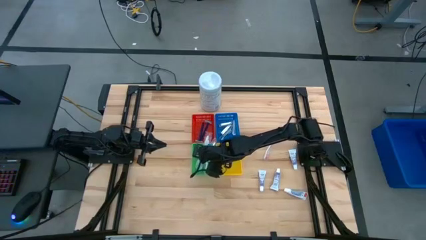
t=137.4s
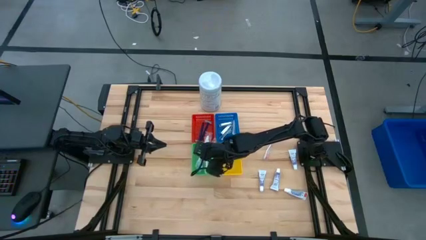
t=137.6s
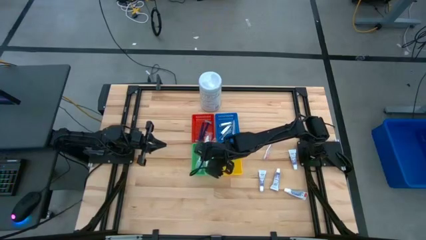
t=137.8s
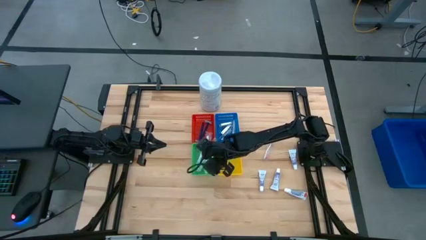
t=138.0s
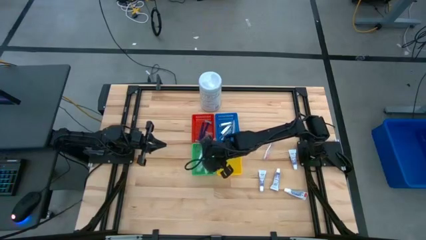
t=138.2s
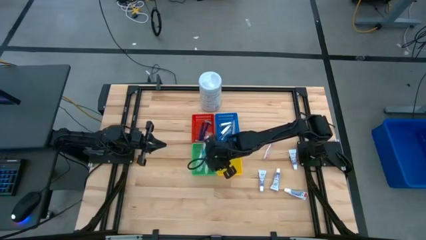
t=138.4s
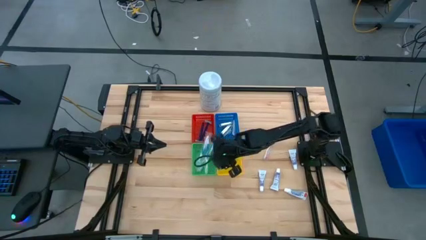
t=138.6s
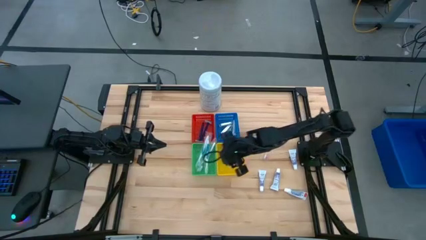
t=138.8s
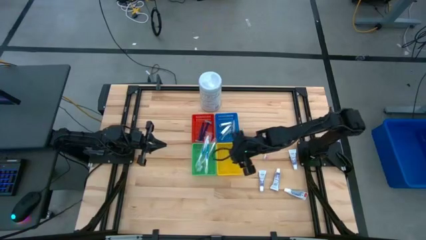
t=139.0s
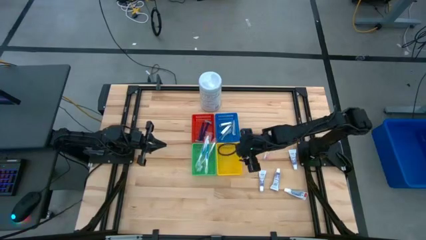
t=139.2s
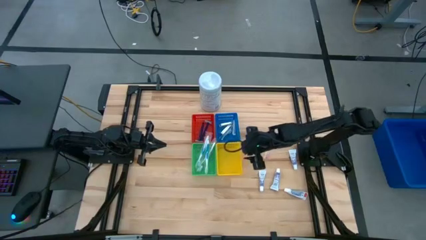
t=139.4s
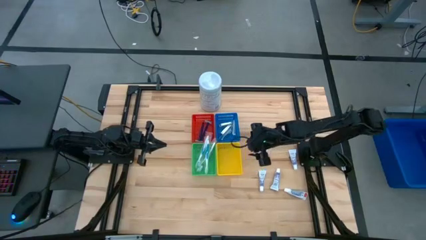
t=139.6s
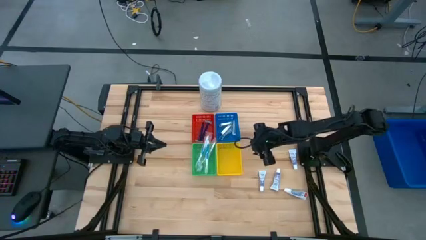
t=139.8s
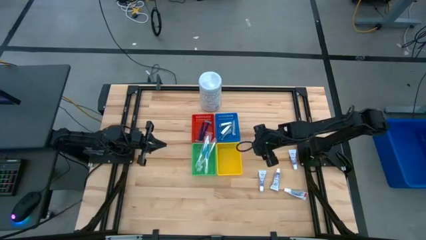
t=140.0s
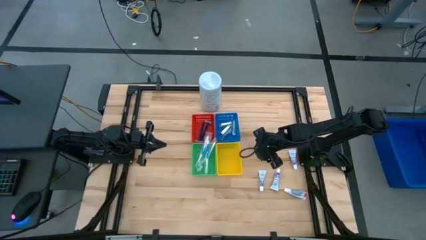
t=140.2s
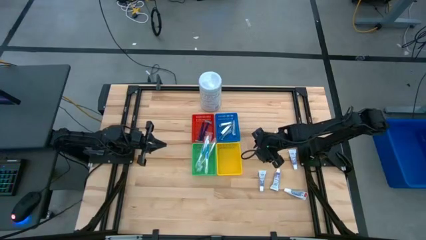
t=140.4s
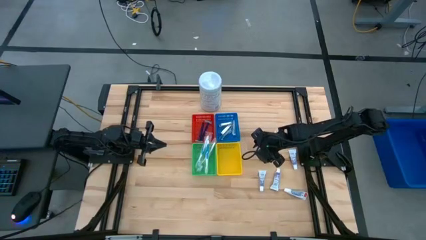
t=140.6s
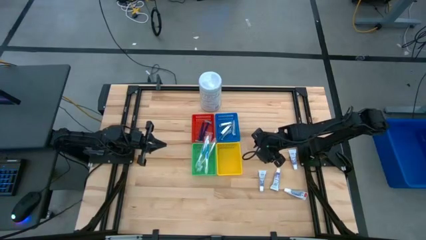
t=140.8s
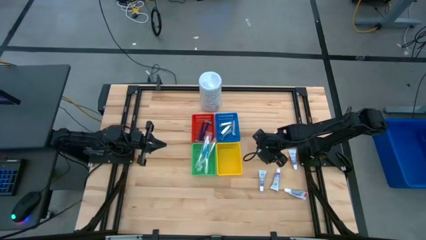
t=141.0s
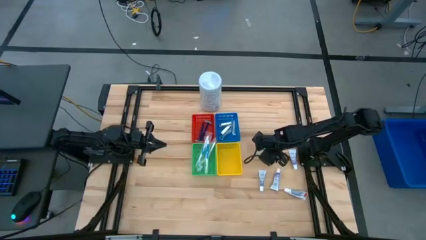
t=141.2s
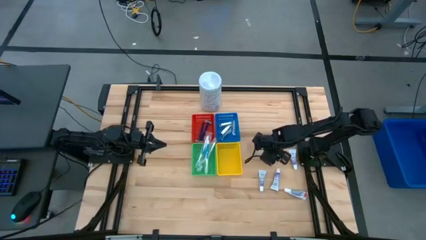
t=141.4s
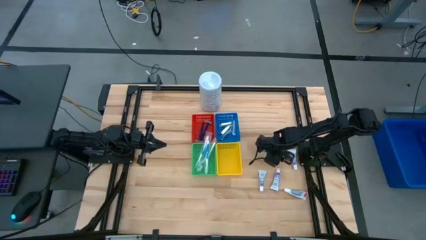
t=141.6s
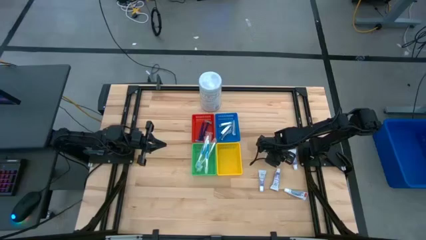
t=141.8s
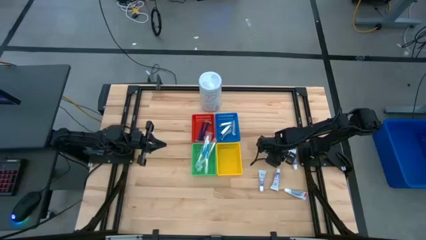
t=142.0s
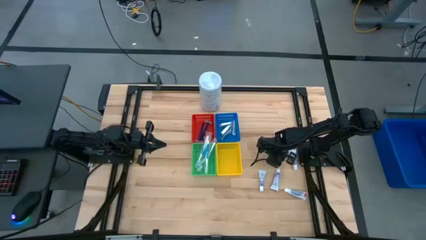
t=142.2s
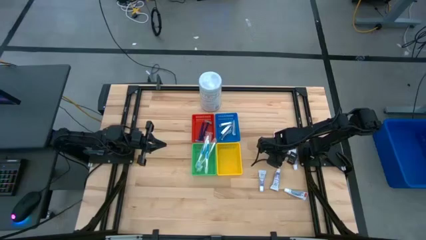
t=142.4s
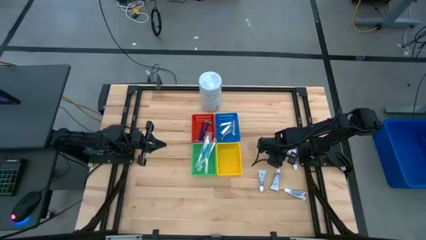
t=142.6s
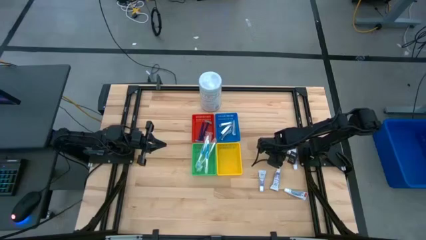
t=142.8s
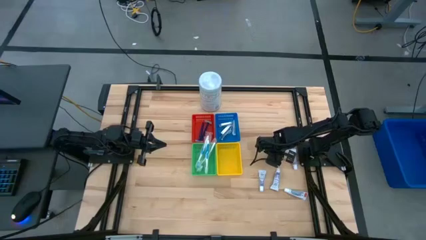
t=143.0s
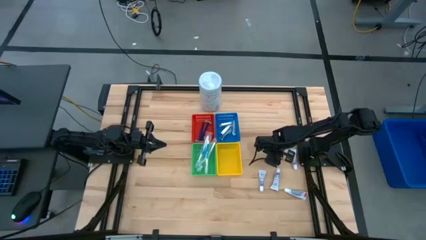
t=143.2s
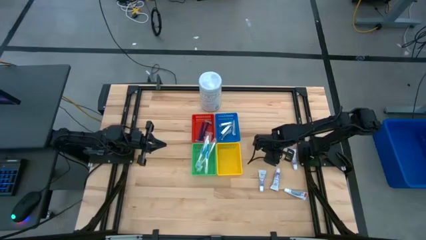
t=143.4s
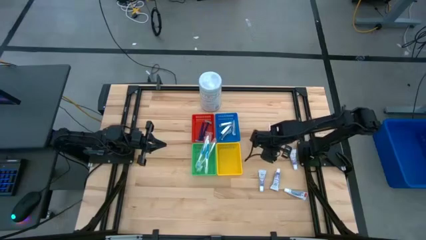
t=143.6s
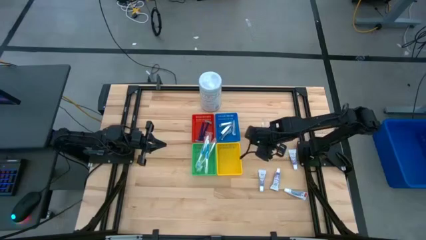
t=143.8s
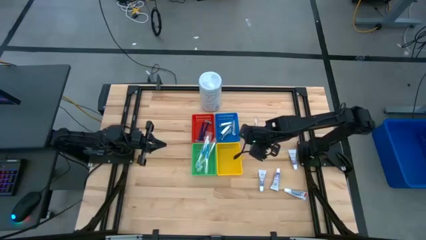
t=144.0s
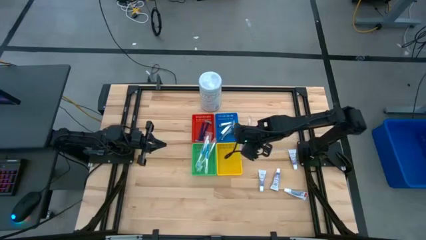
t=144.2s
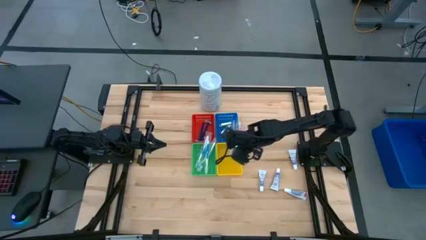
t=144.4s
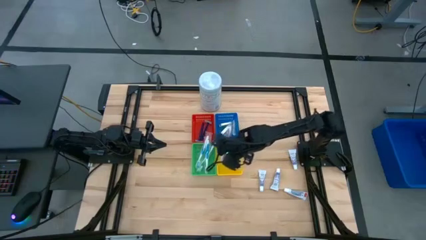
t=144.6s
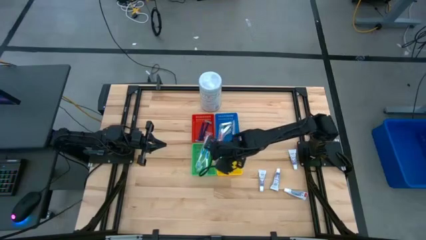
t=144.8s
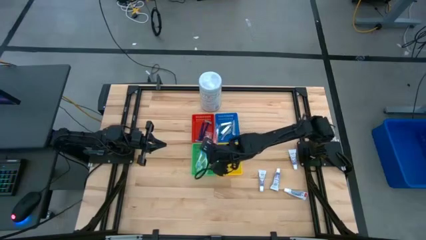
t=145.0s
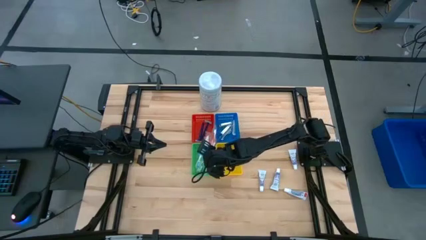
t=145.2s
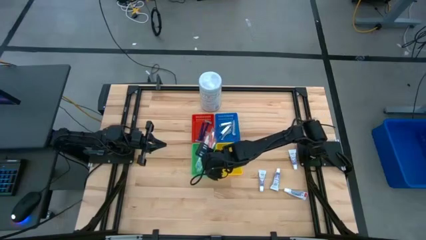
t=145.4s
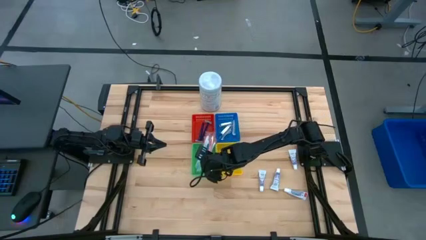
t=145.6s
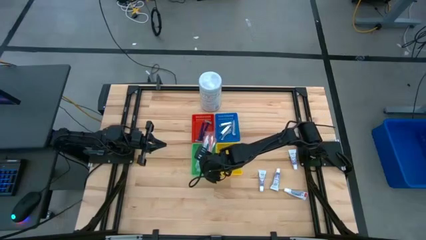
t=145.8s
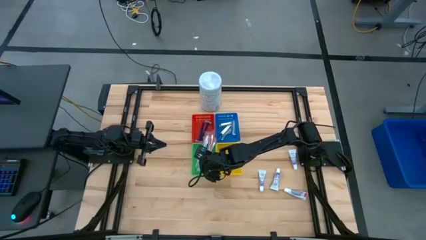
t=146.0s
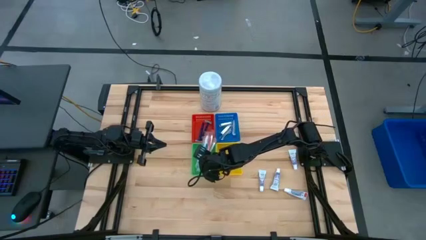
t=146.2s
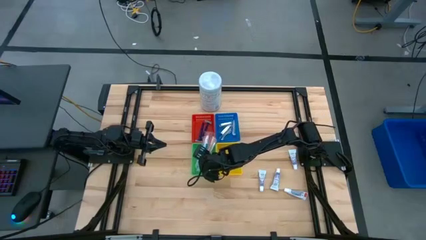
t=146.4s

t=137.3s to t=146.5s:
Task: Pick & Place Travel size toiletries
Put the orange toothbrush into the green bin

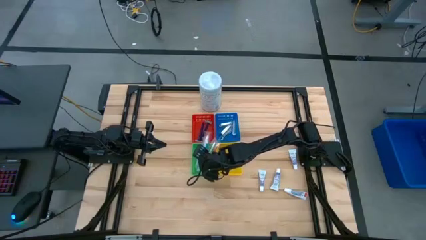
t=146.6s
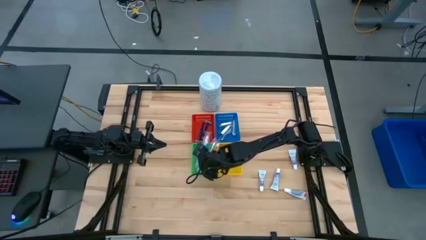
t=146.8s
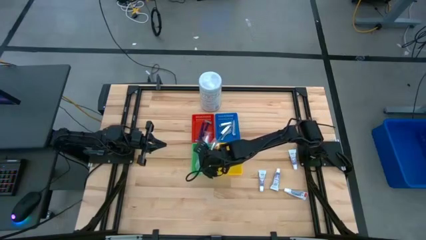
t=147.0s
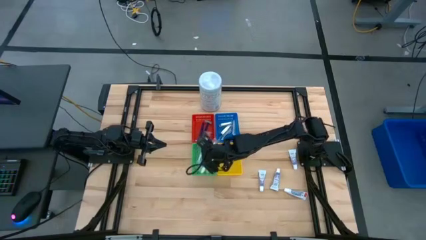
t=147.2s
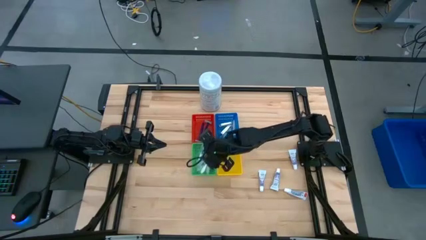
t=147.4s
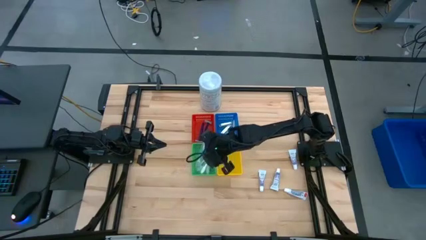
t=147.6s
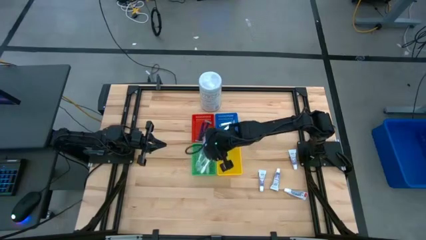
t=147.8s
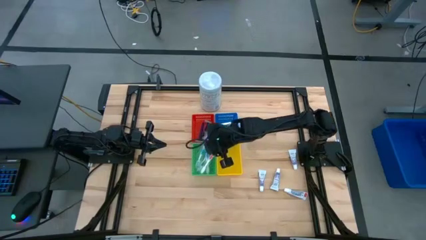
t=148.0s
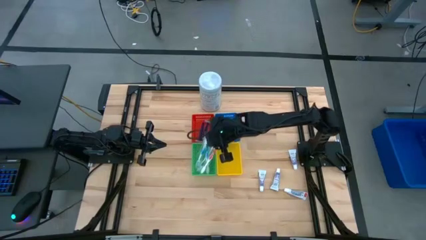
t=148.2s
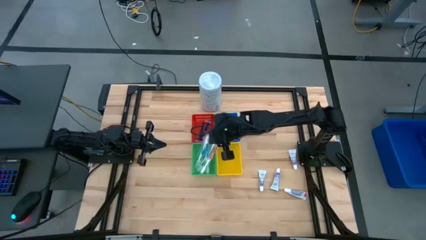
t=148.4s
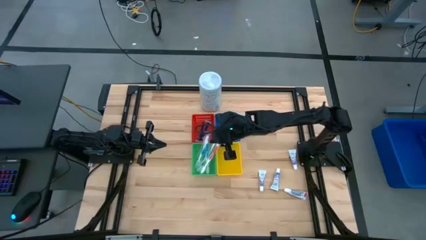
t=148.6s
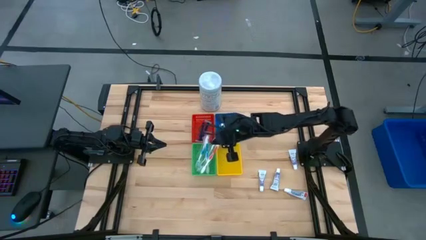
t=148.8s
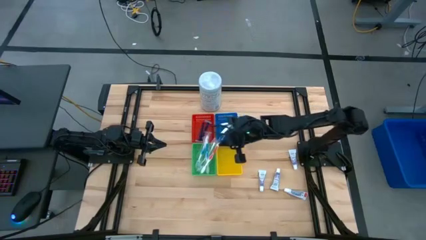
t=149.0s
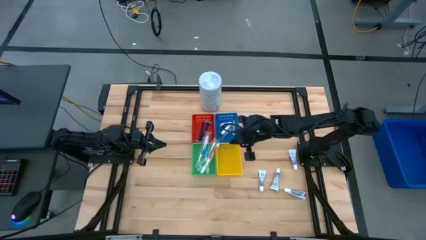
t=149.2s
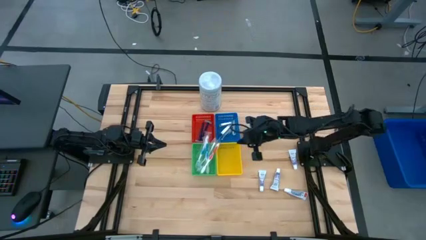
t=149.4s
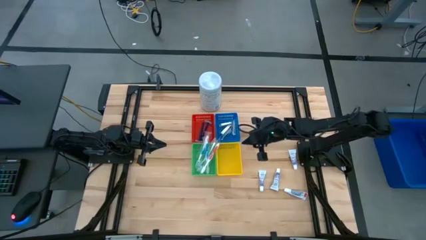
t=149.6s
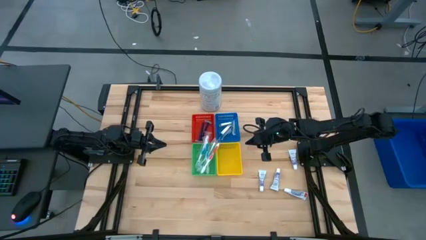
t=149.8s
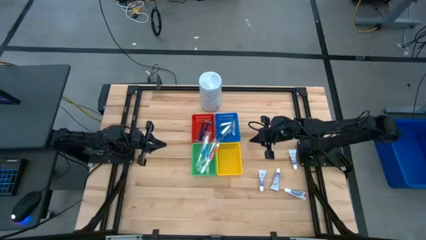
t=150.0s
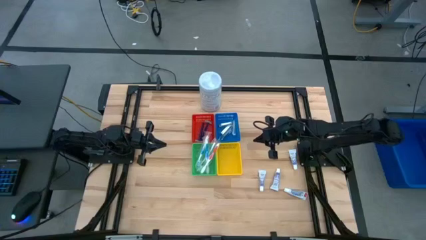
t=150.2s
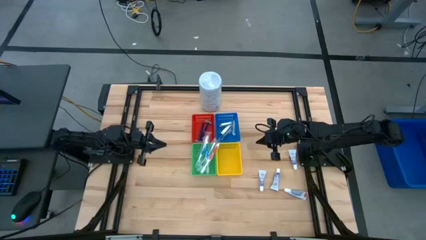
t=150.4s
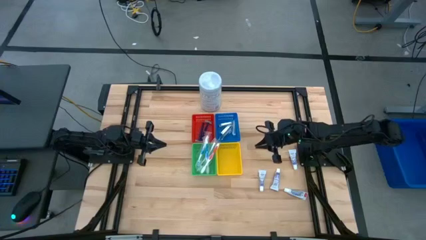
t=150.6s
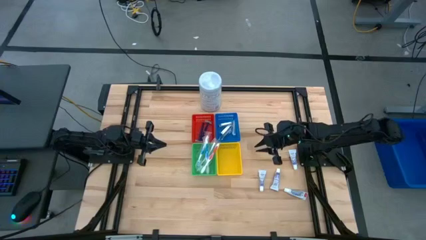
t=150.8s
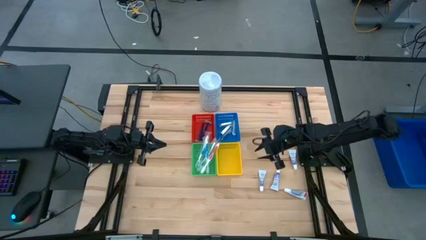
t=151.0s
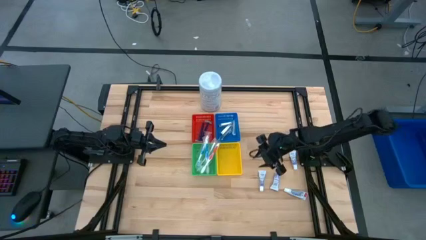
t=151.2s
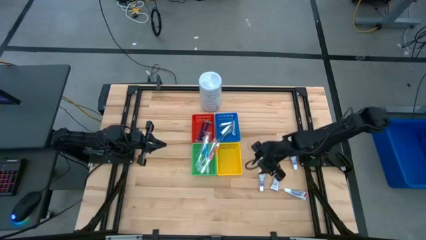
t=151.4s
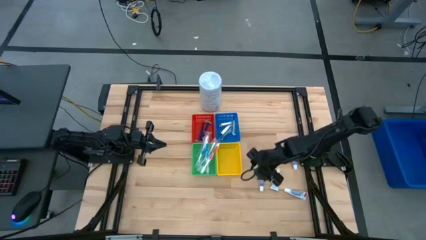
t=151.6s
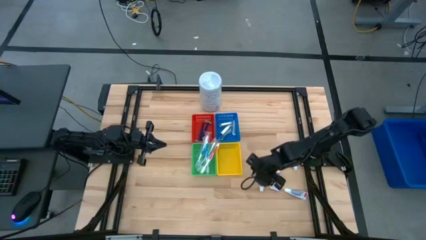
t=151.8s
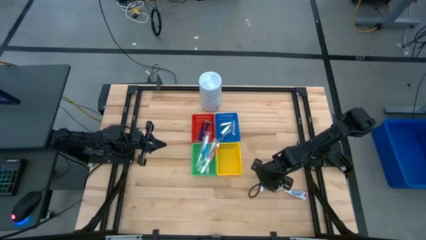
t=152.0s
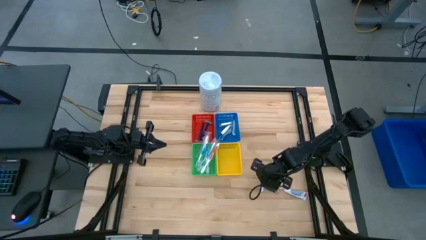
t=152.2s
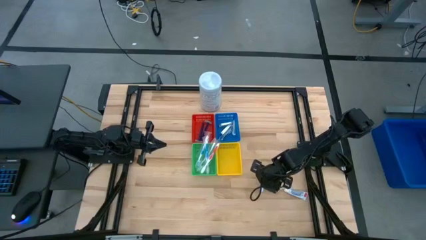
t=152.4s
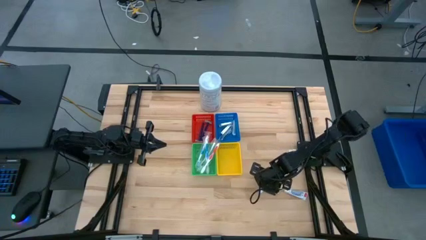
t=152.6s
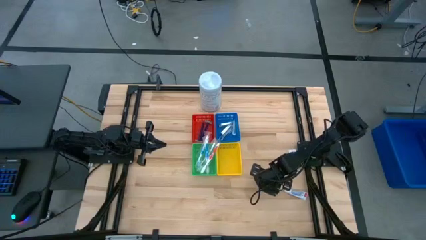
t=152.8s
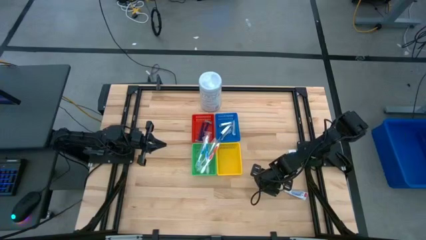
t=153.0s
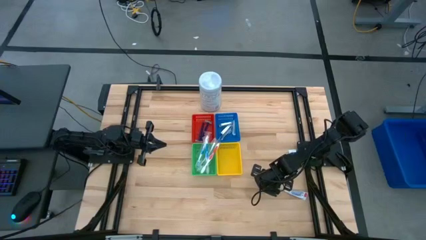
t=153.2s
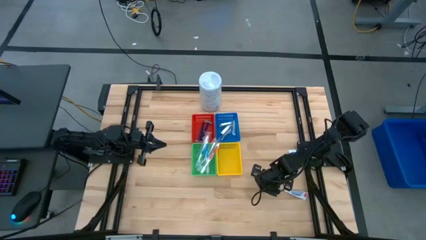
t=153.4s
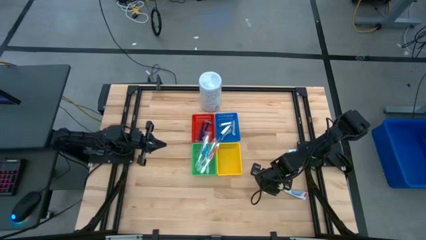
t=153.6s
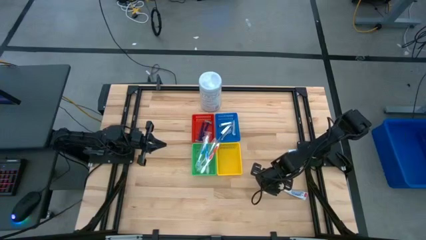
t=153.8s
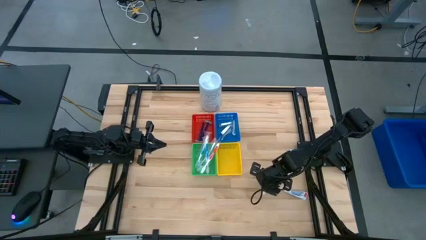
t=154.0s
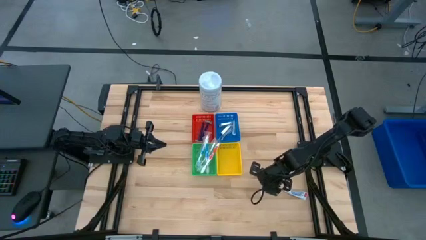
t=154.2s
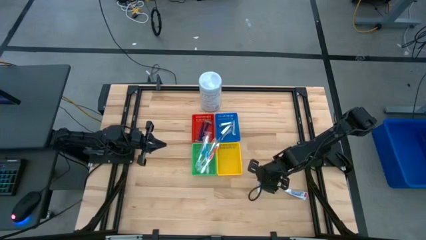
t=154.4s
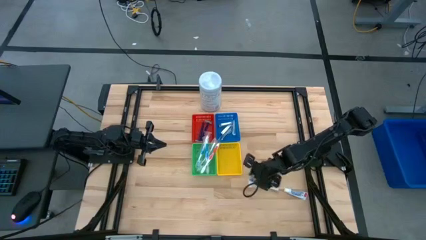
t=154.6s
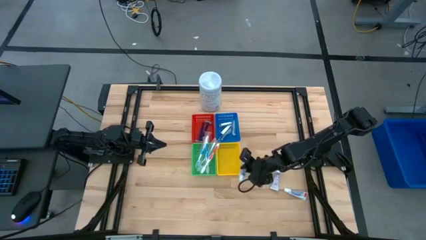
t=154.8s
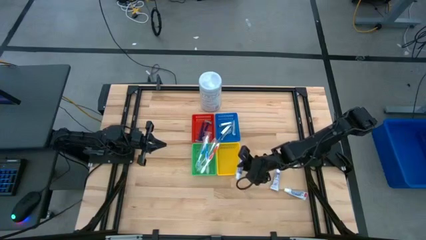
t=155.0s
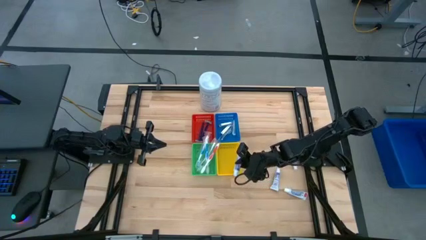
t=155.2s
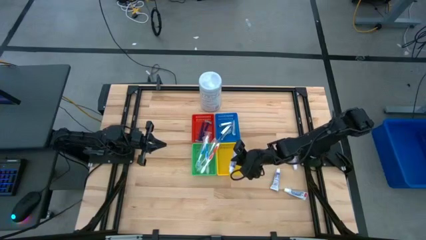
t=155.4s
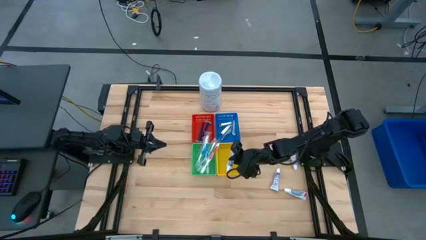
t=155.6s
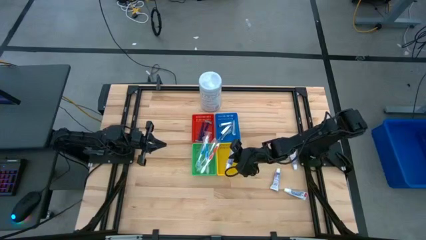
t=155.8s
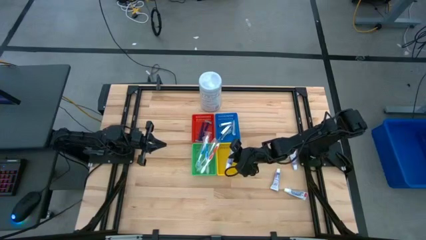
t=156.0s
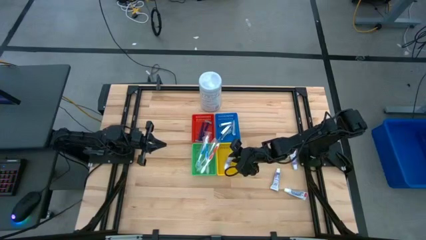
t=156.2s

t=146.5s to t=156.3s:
Put the white toothpaste into the yellow bin
